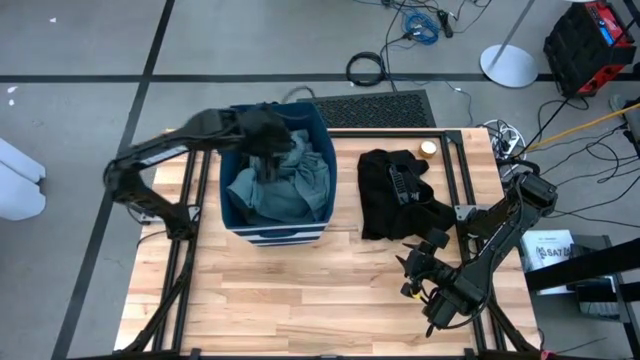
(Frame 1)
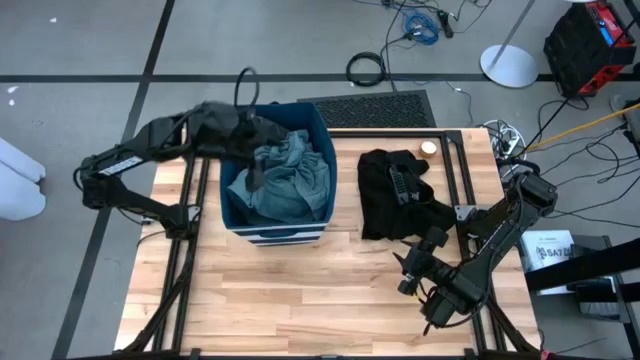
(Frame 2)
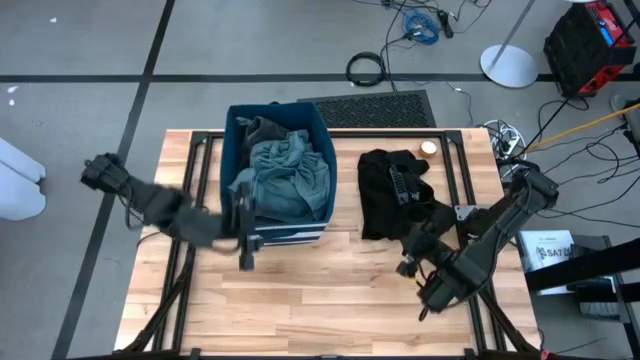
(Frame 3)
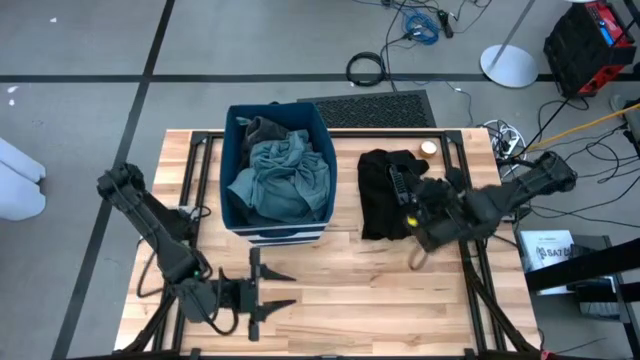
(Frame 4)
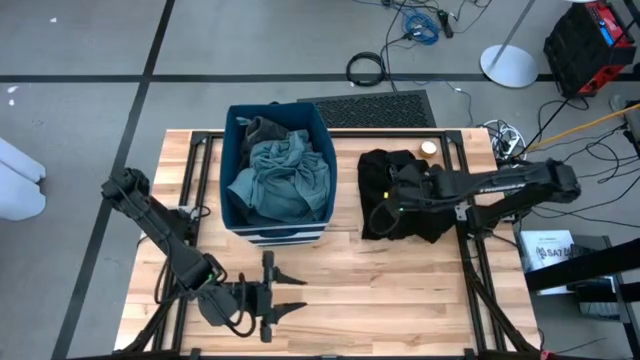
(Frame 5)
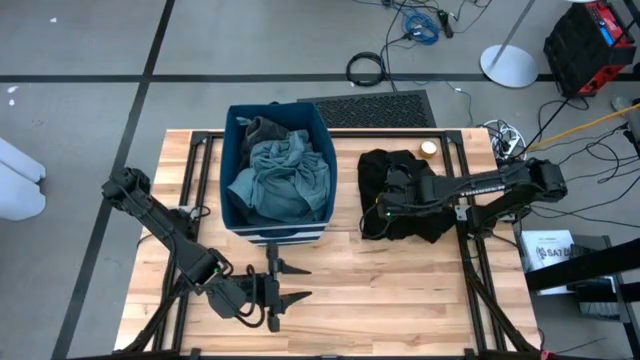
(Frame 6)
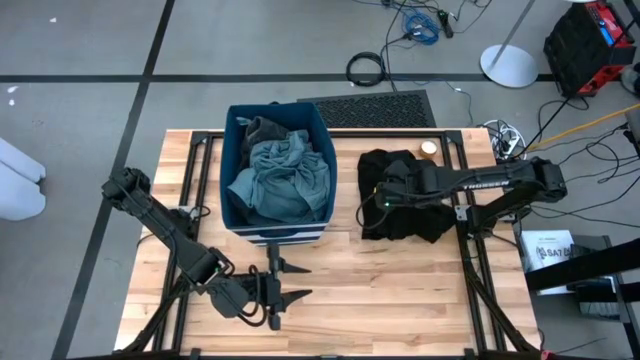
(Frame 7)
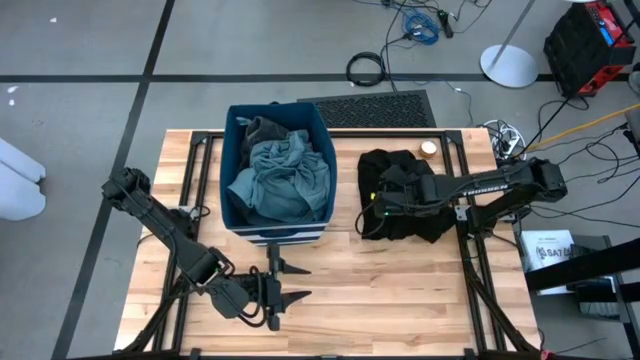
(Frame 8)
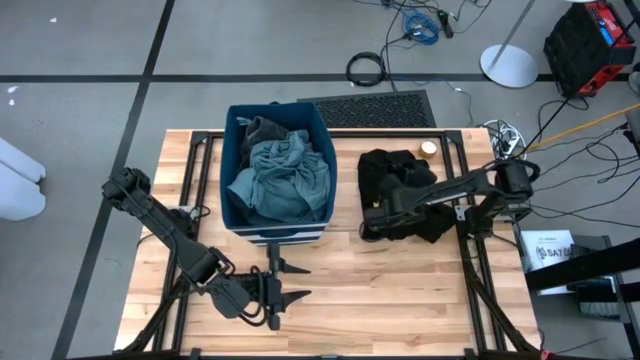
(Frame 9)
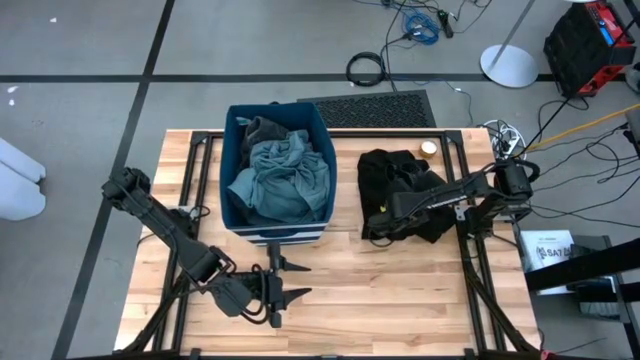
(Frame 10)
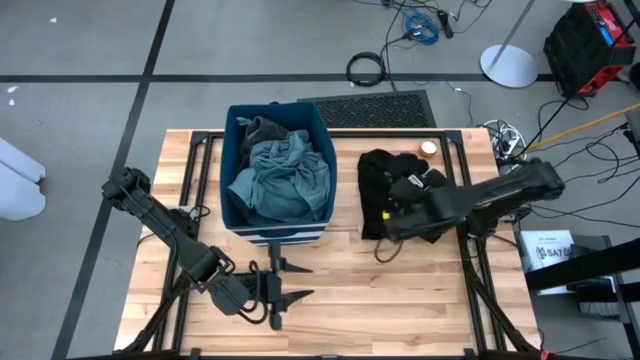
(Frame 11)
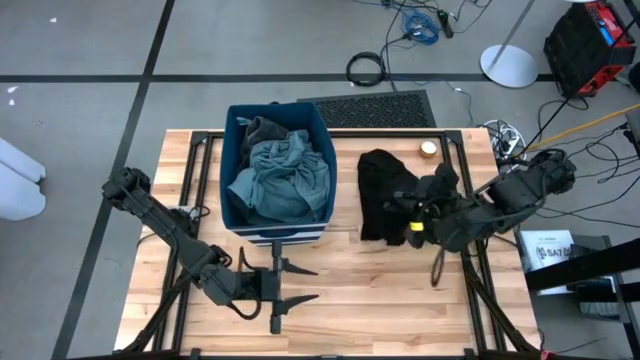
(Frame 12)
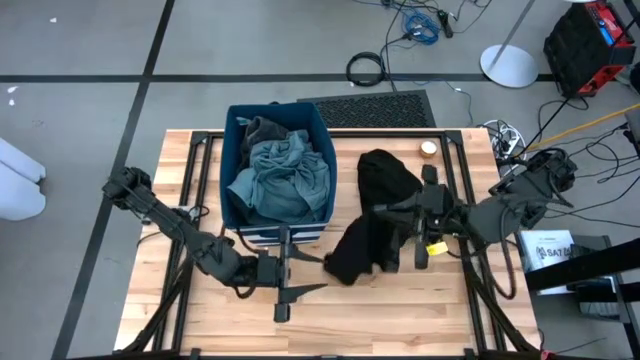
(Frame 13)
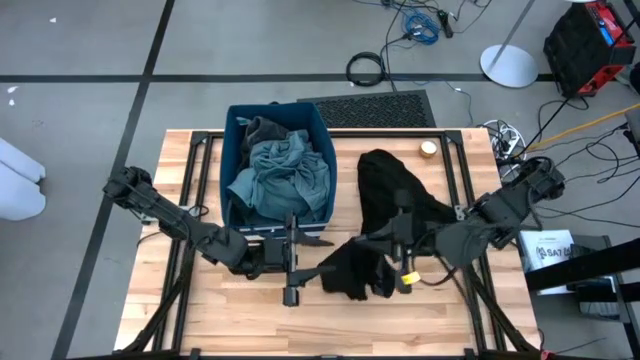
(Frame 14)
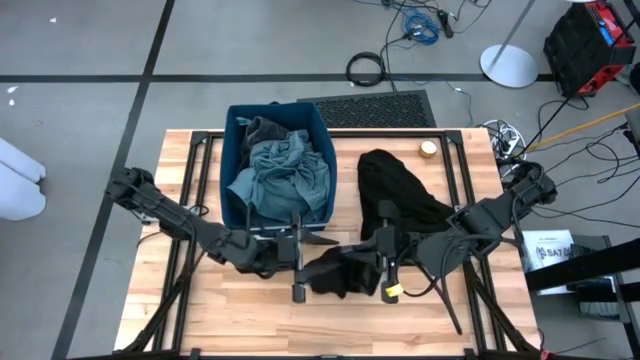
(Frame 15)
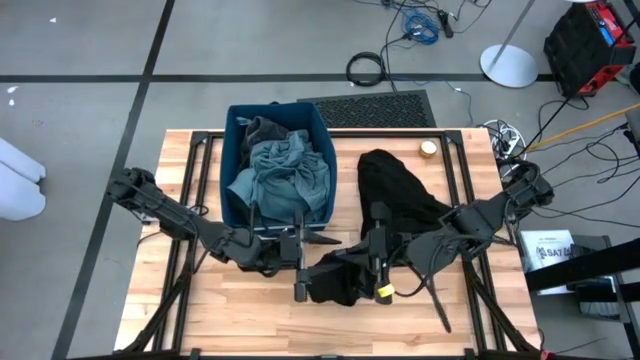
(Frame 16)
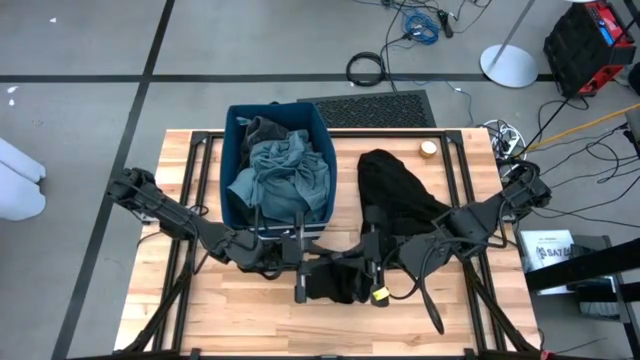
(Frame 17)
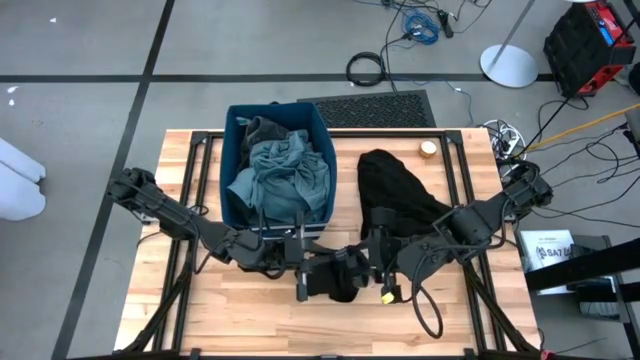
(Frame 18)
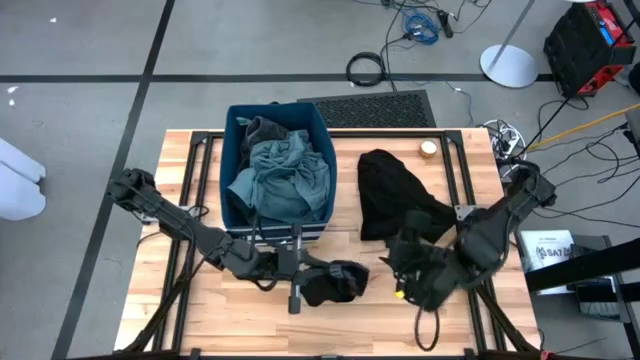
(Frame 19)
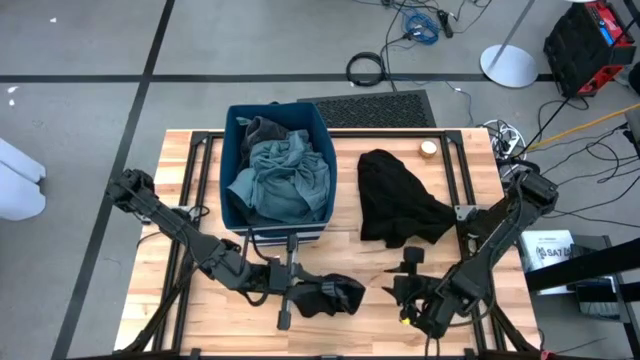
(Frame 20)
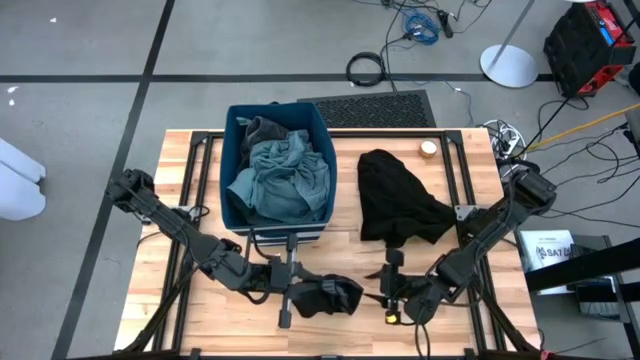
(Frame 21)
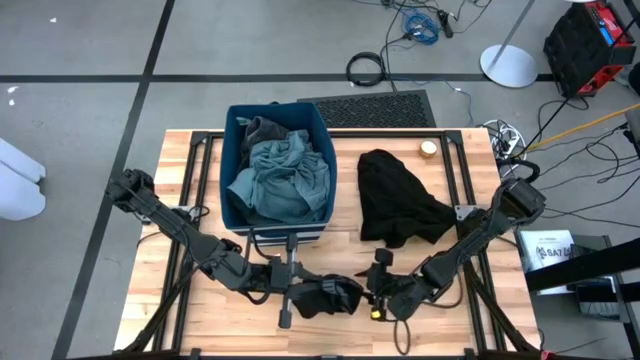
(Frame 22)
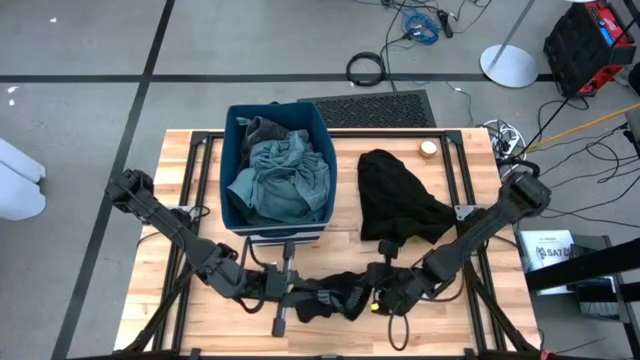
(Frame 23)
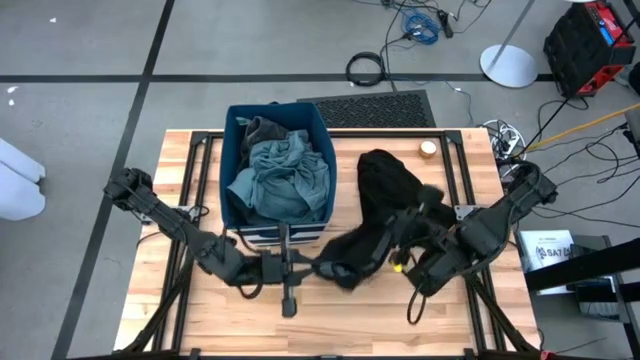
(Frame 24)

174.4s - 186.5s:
Task: Sort clothes
Put the black boxer into the blue laundry organizer

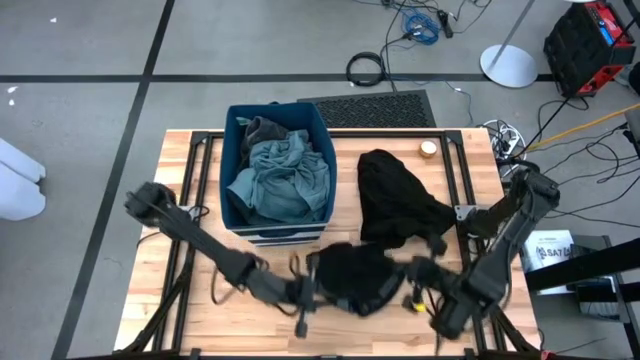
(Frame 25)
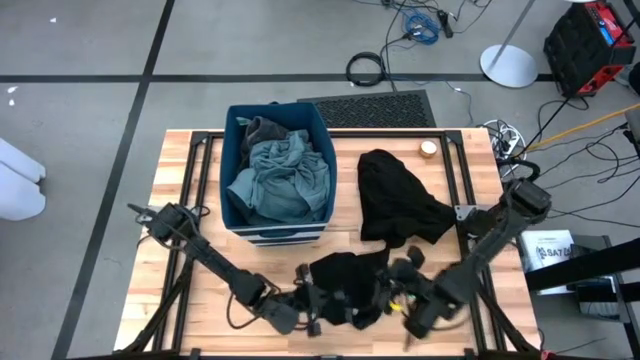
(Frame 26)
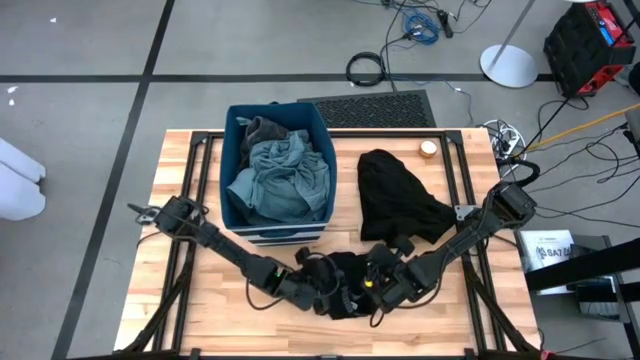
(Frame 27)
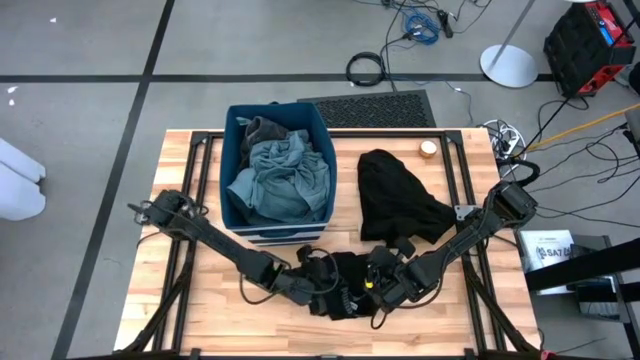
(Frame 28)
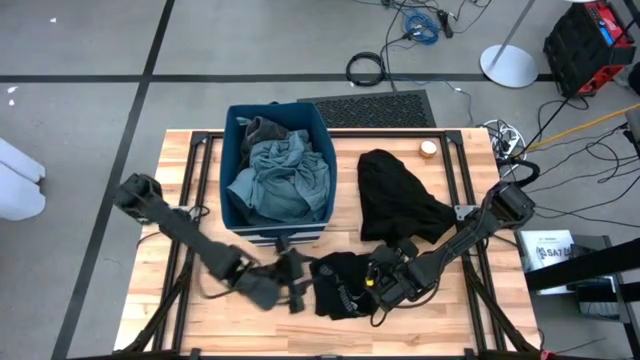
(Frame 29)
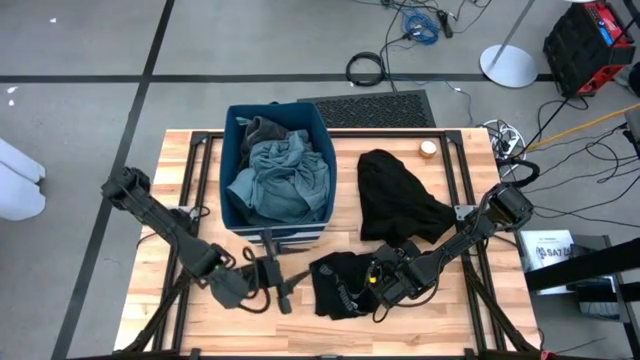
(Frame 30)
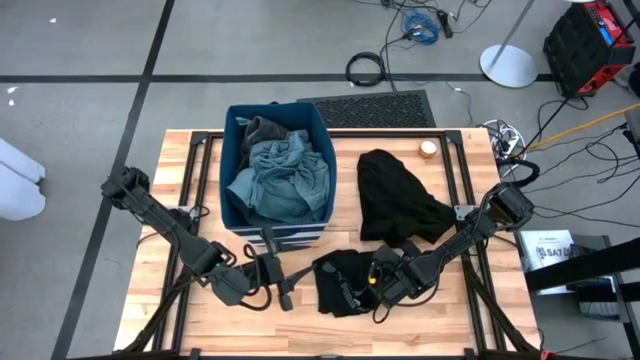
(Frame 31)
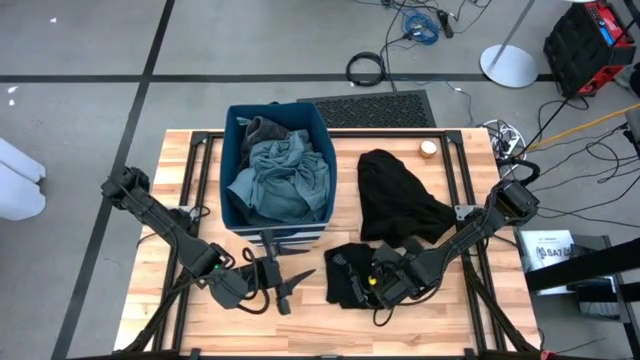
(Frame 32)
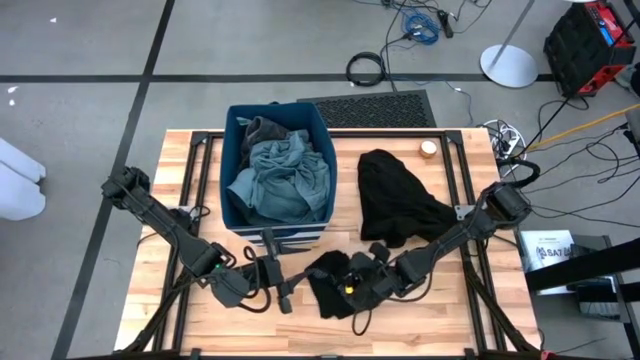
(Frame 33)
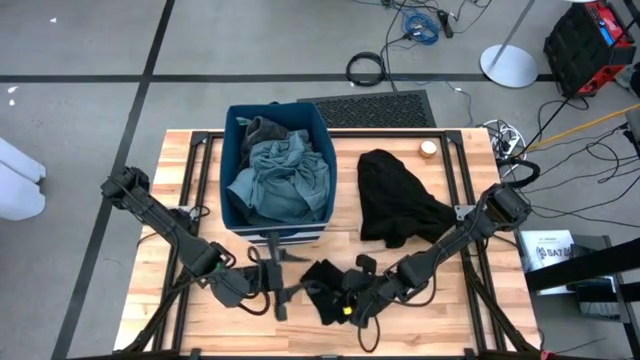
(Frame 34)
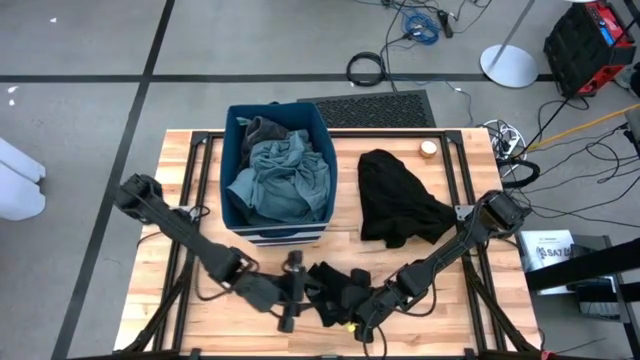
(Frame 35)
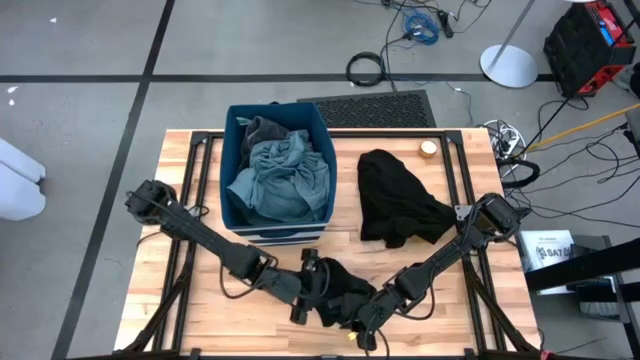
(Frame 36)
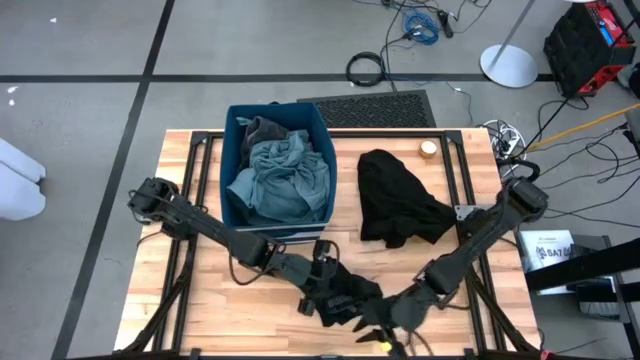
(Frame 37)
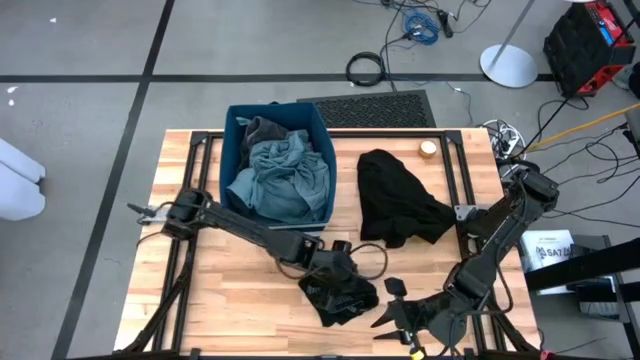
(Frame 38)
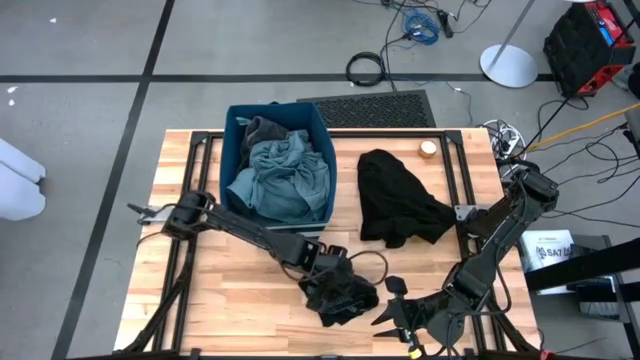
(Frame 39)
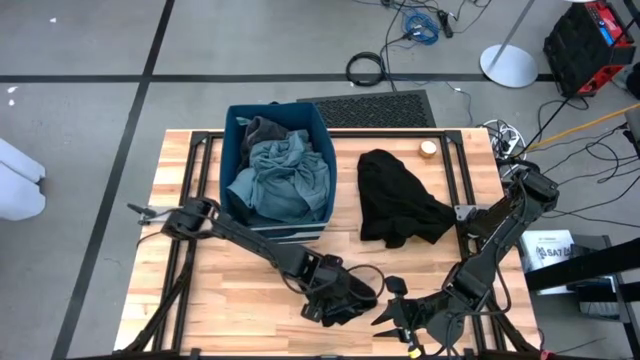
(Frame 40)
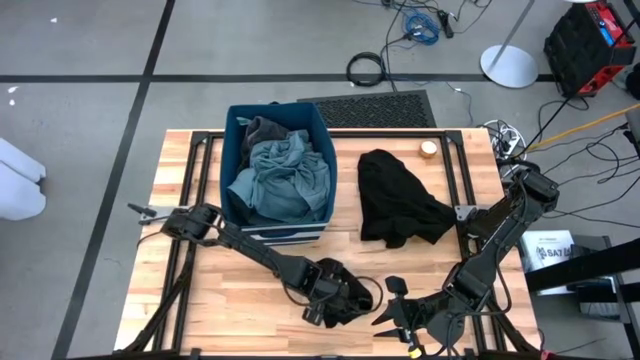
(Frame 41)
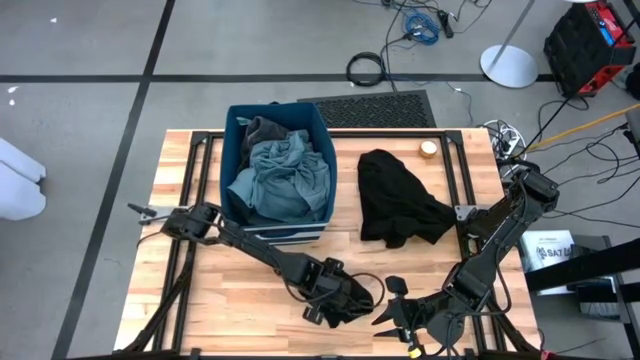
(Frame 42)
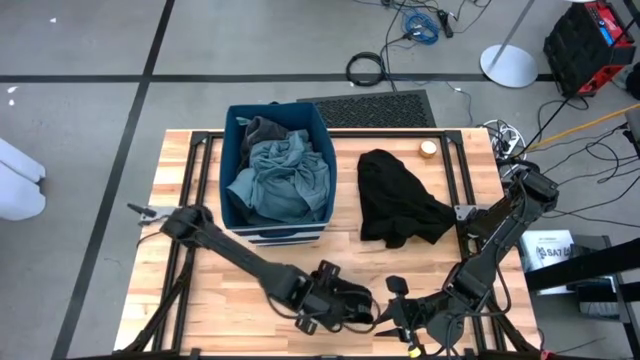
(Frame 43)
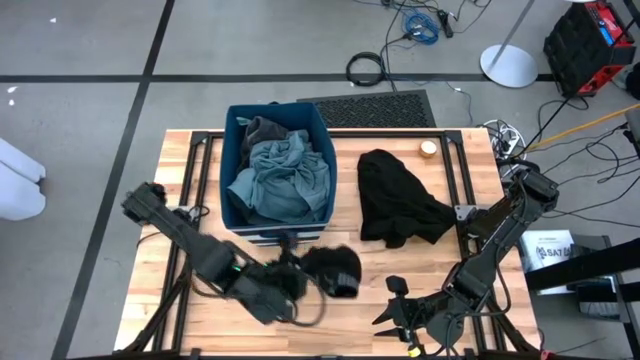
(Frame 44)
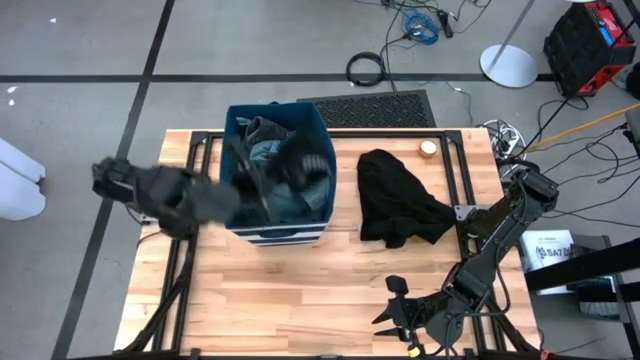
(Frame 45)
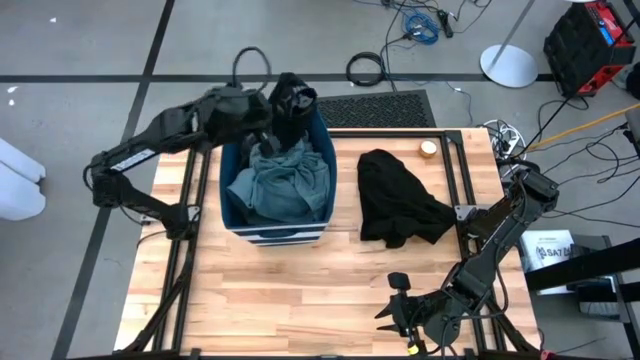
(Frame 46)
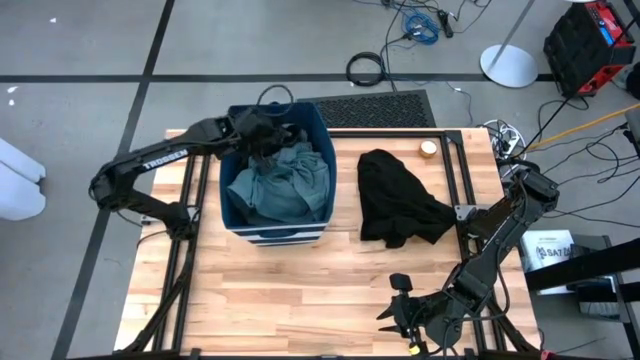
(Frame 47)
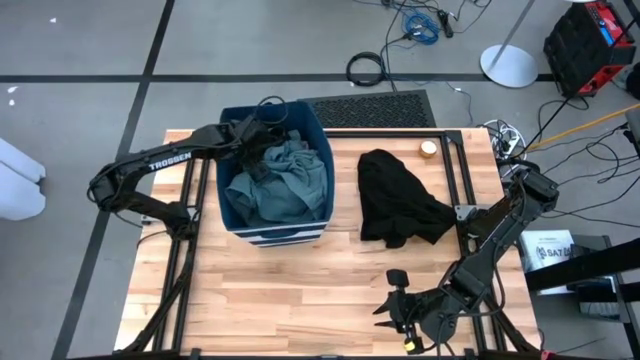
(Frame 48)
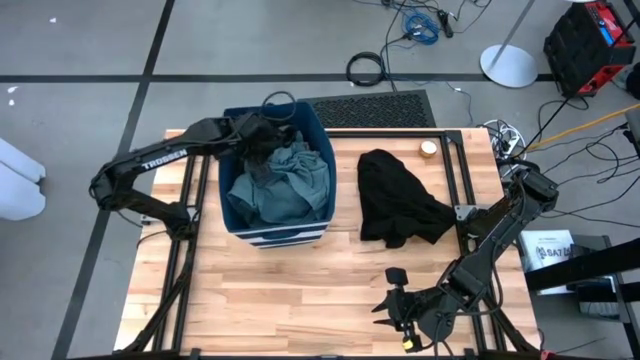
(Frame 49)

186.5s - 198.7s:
Put the black boxer into the blue laundry organizer
